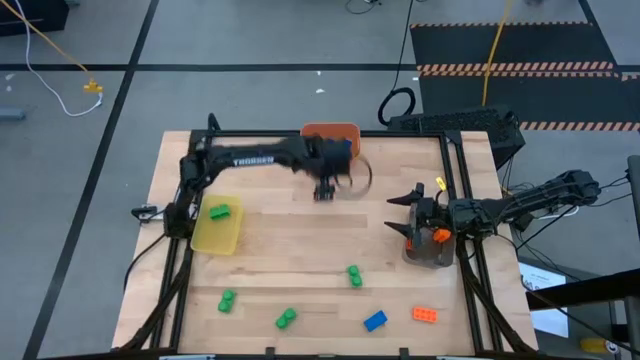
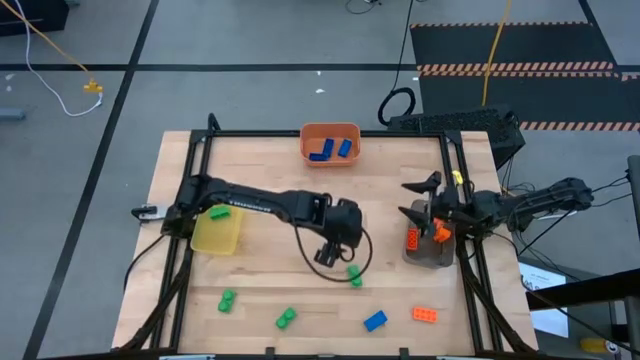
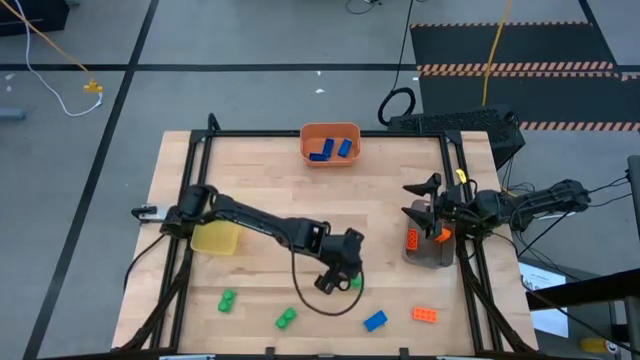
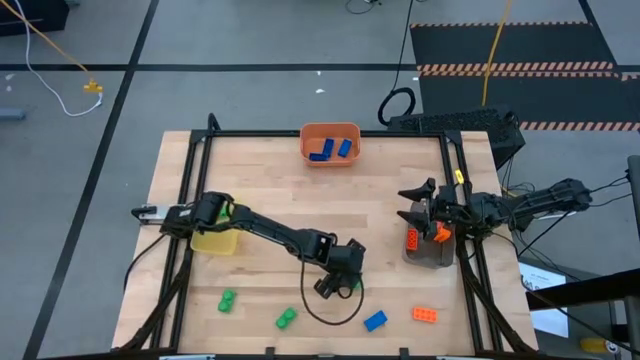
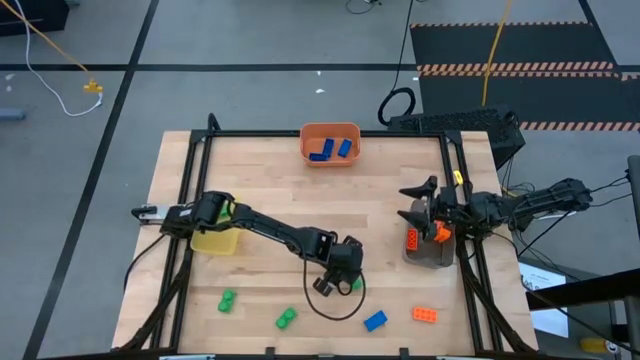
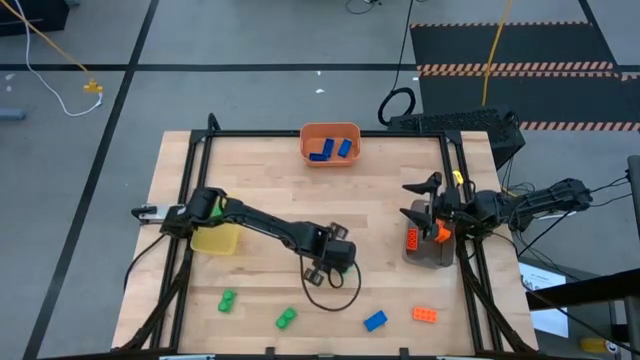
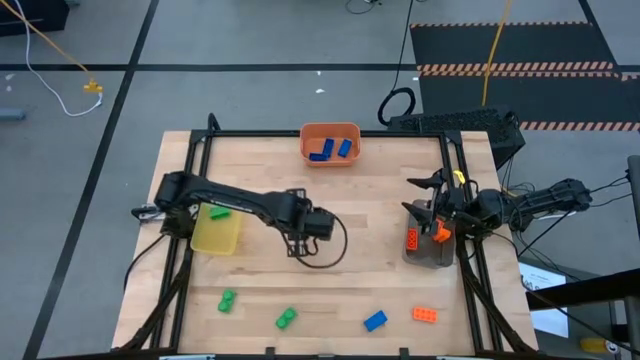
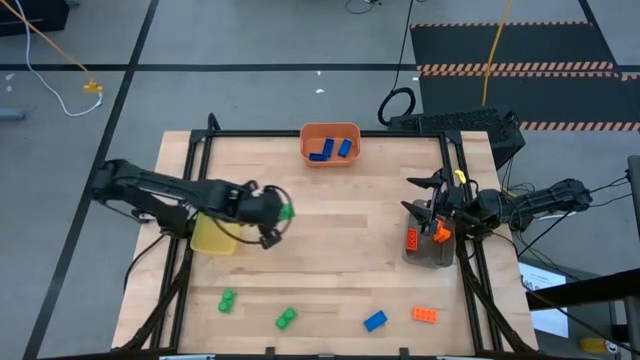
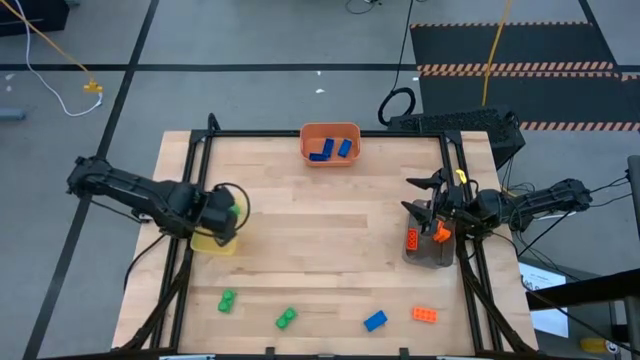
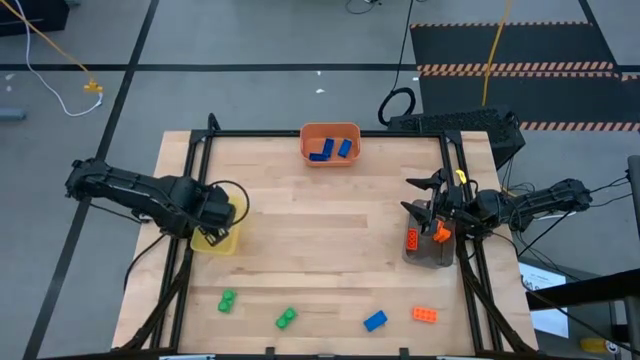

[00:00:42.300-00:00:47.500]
Task: Sort & place blocks by color
Put the green game piece into the yellow bin

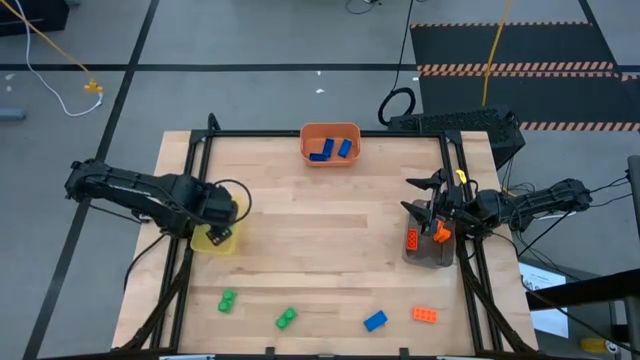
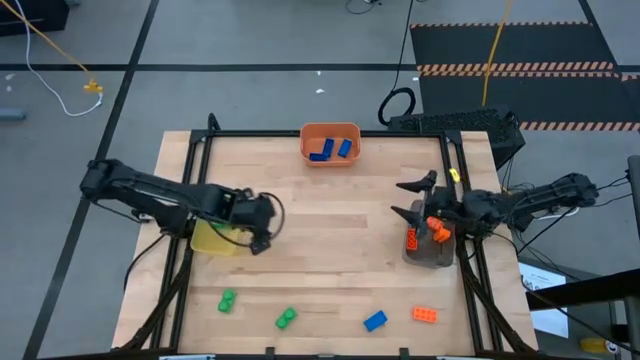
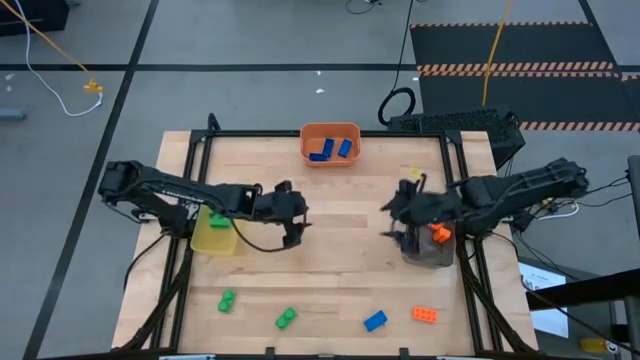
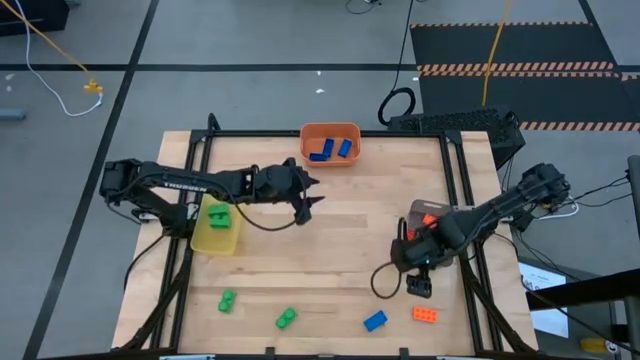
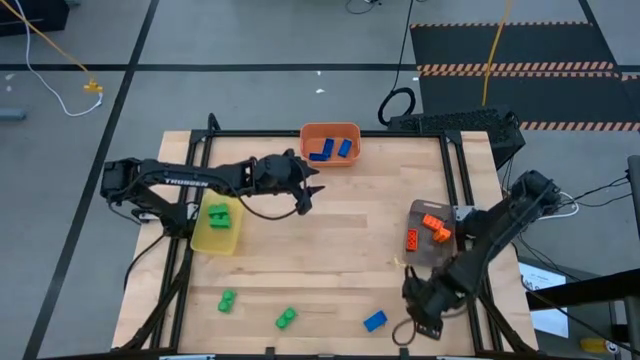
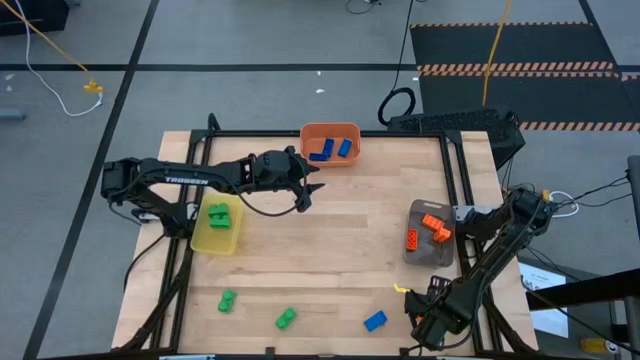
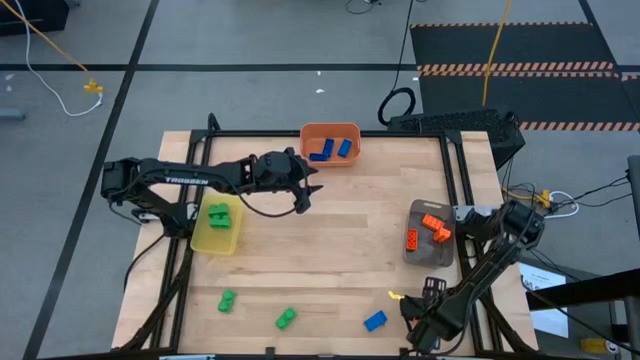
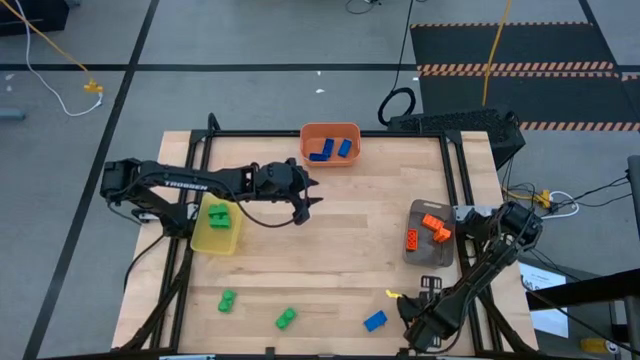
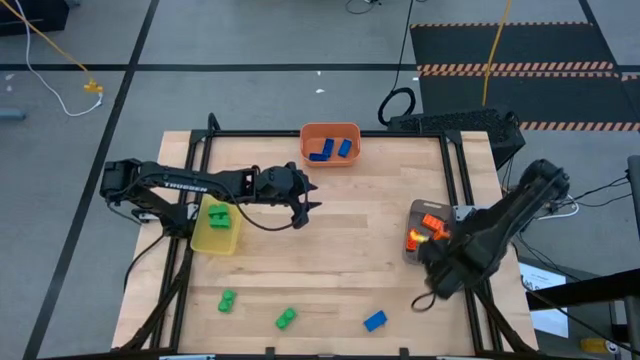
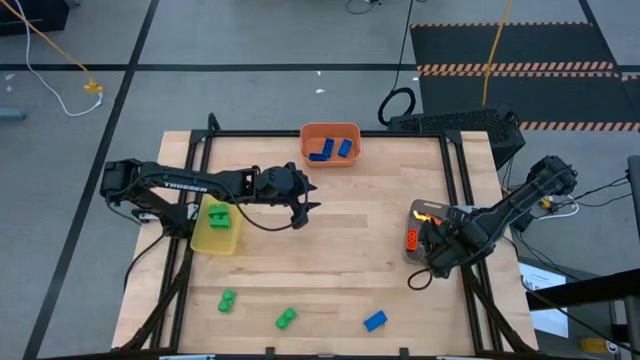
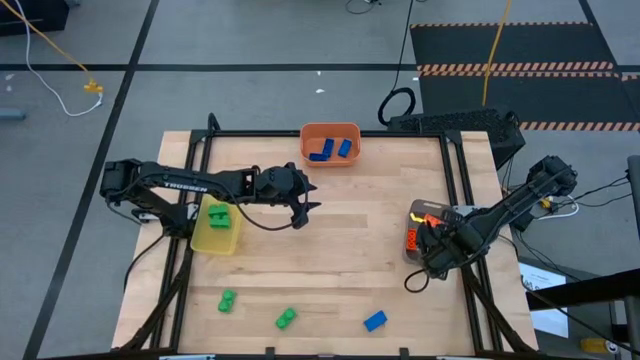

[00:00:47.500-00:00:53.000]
Put the orange game piece into the black bin

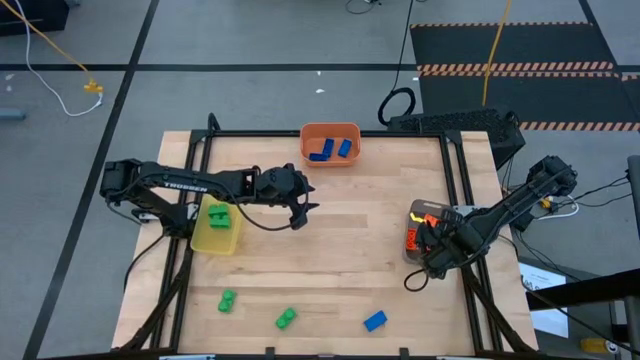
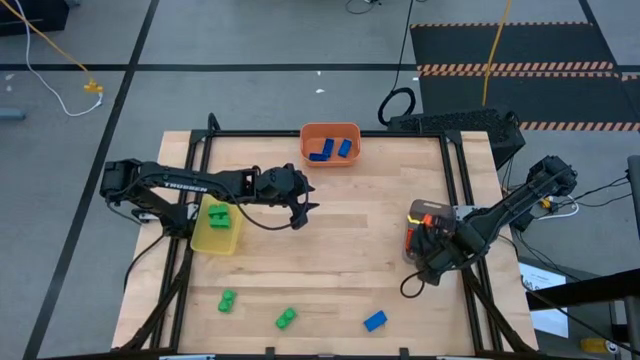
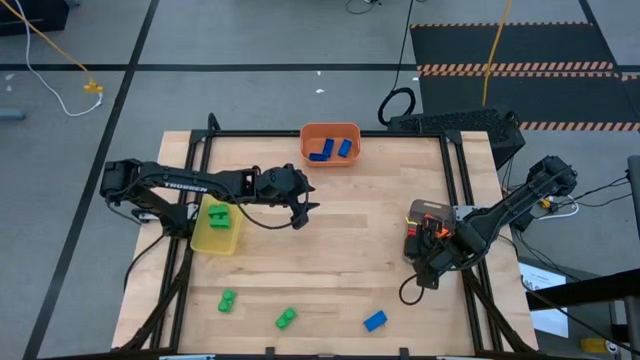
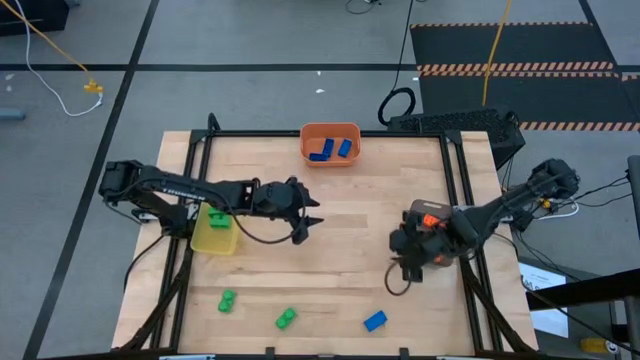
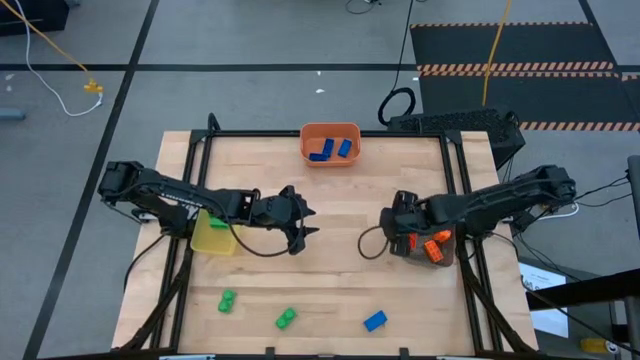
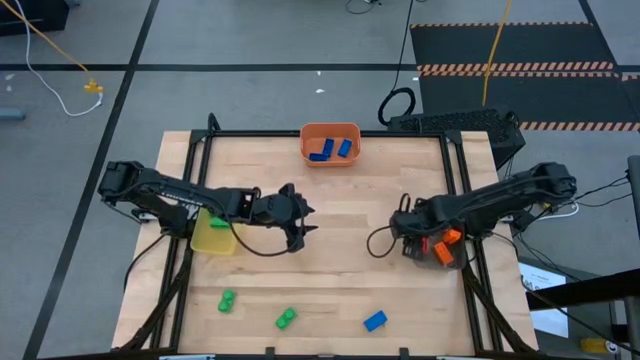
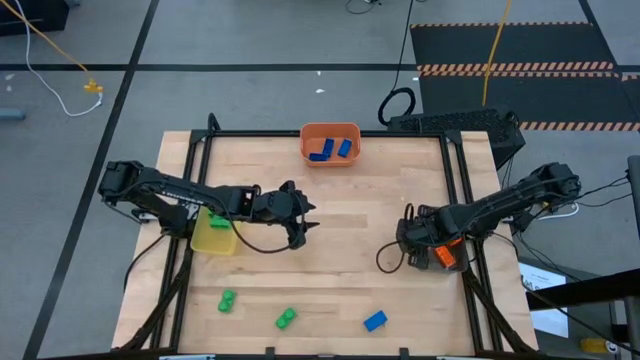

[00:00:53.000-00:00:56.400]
Adjust the black bin

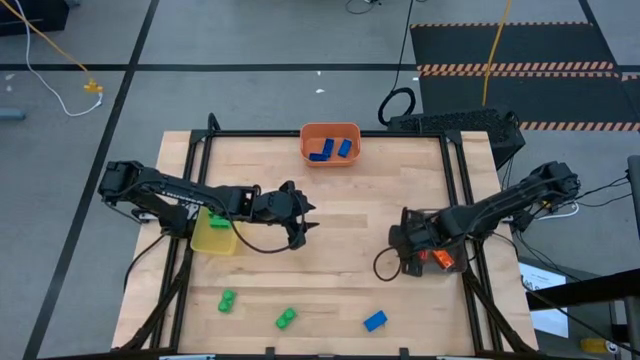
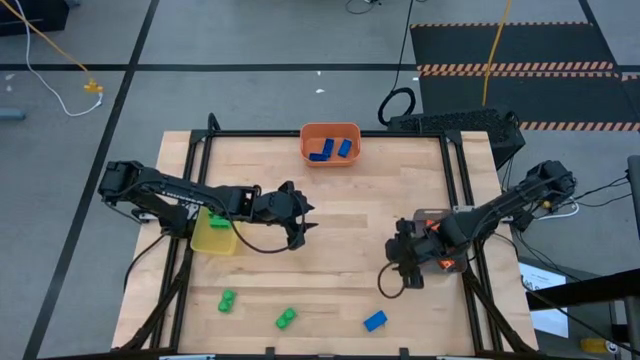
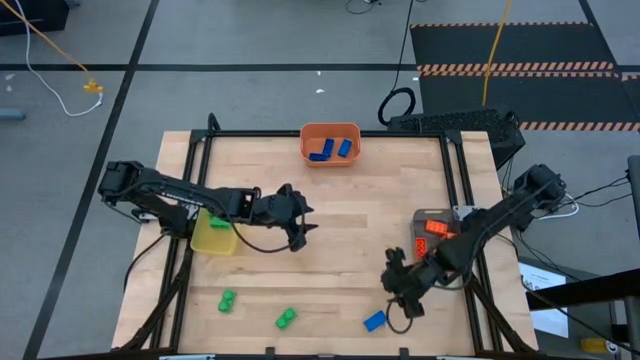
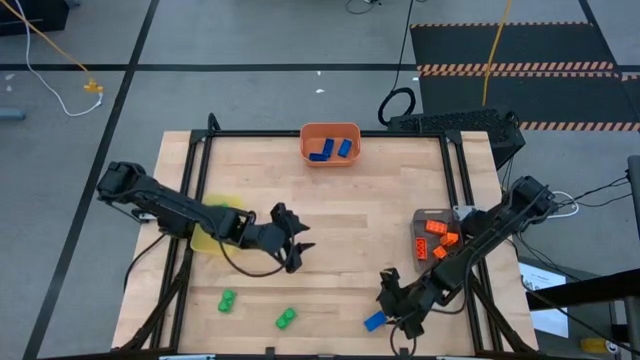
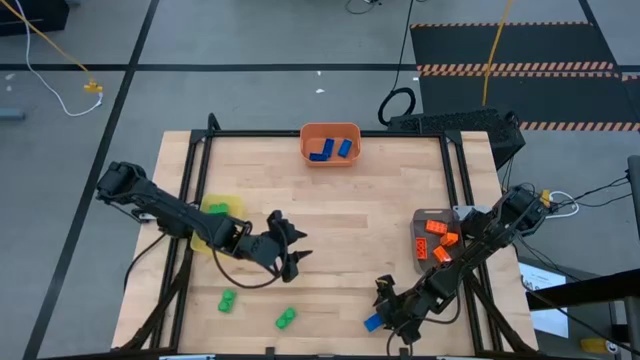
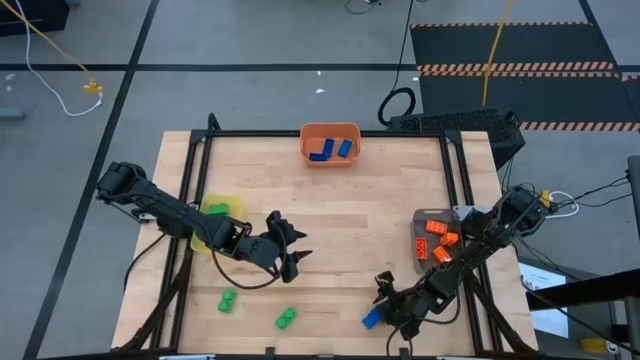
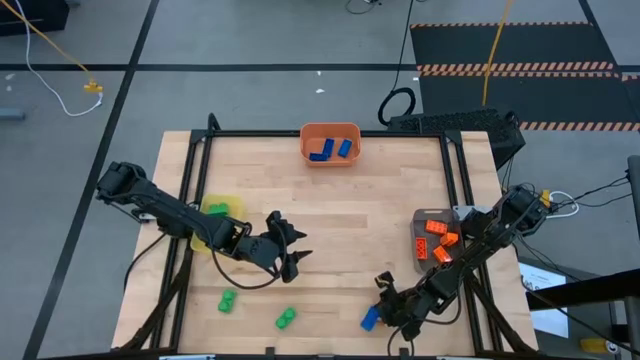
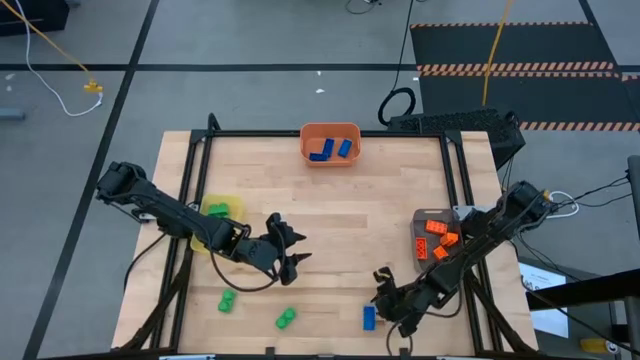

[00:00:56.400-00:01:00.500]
Put the blue game piece into the orange bin

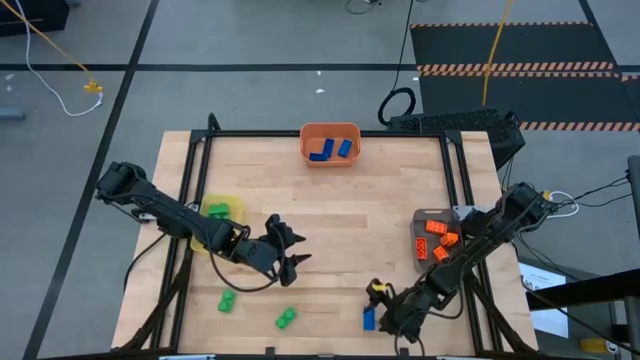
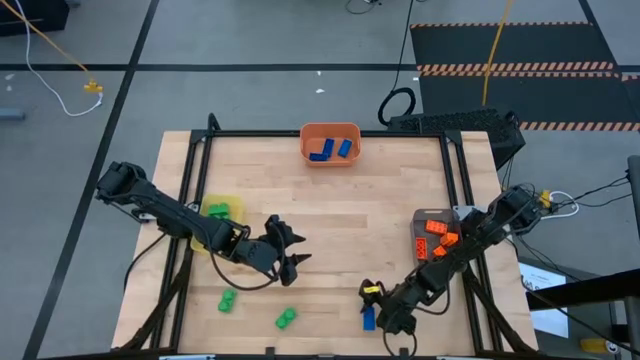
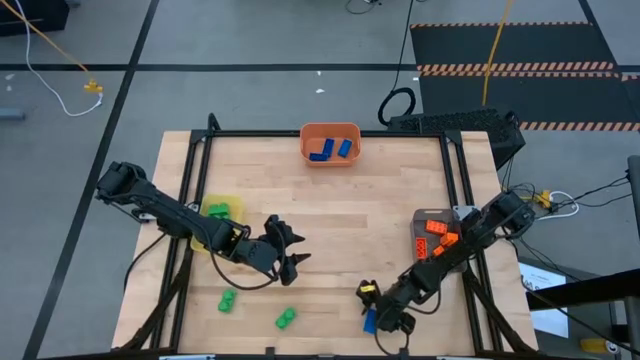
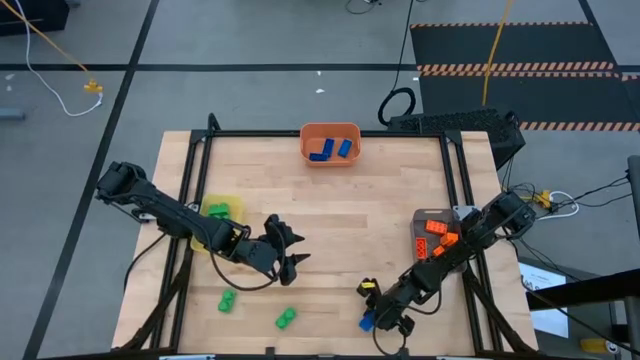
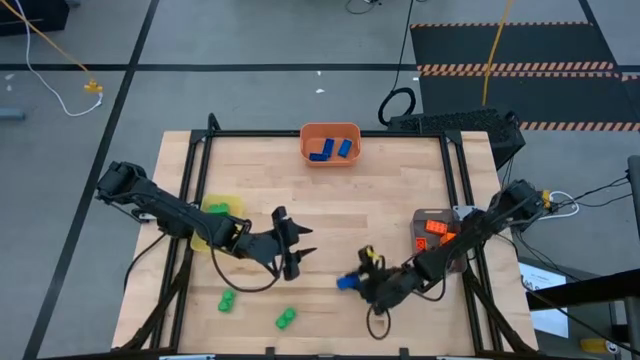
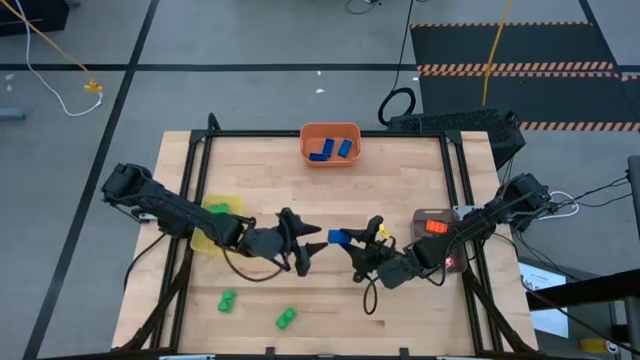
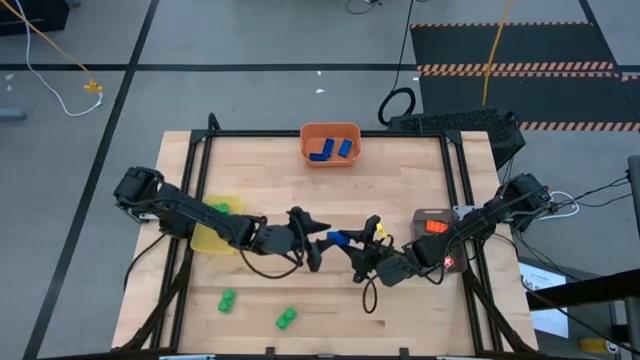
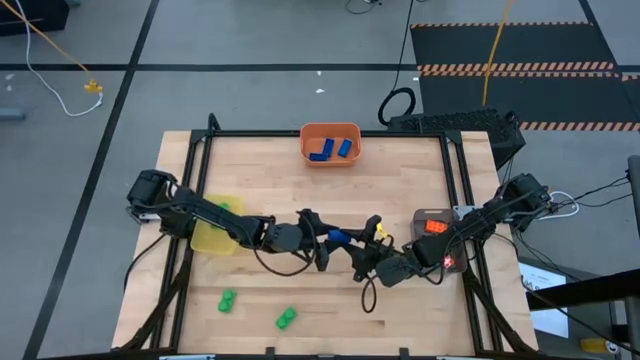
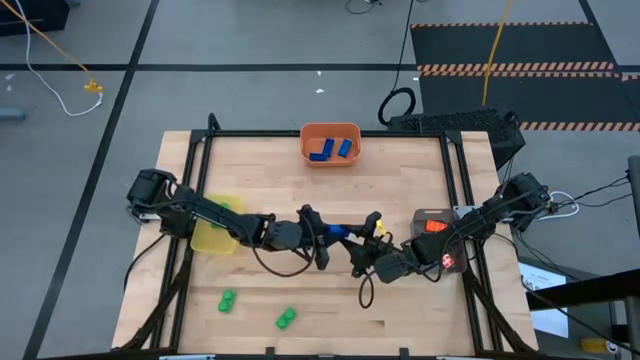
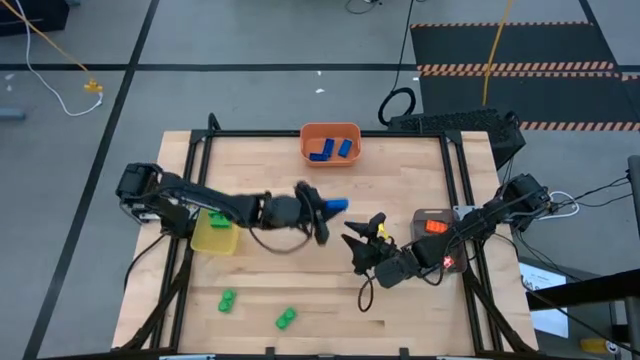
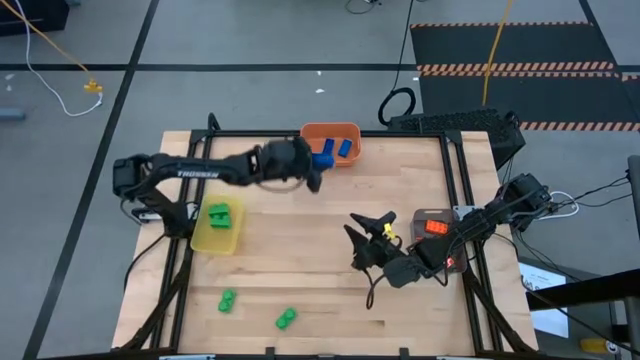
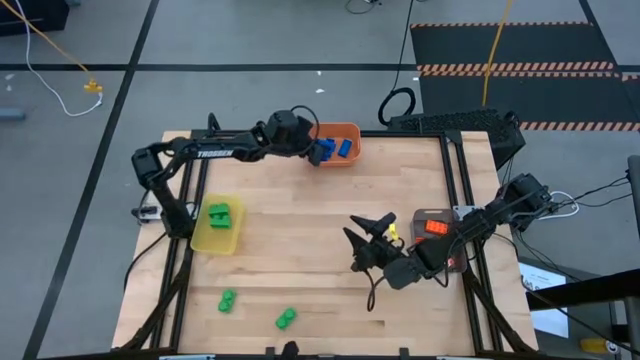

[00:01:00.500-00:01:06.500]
Put the blue game piece into the orange bin
